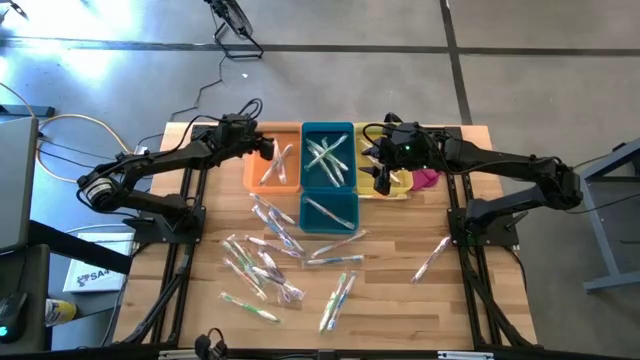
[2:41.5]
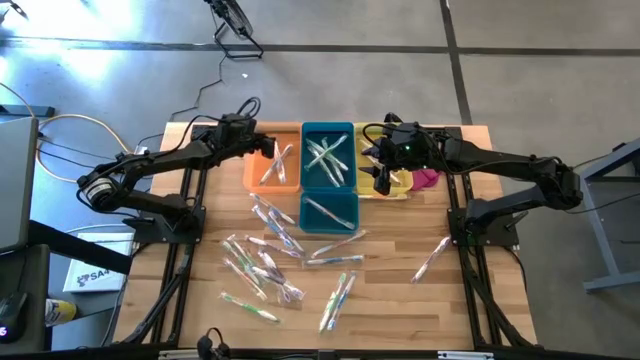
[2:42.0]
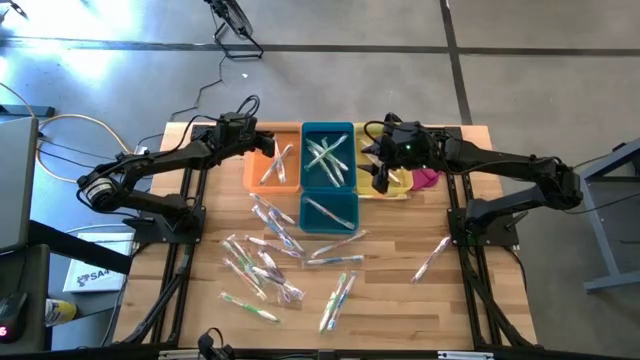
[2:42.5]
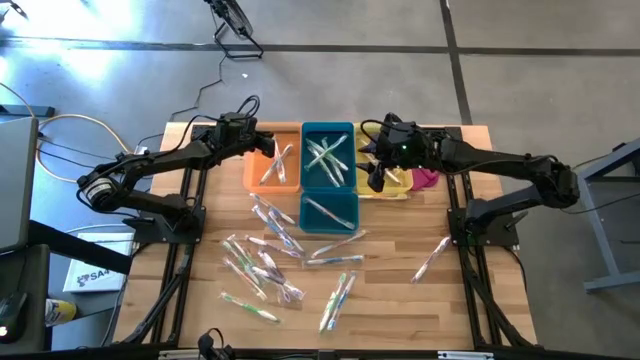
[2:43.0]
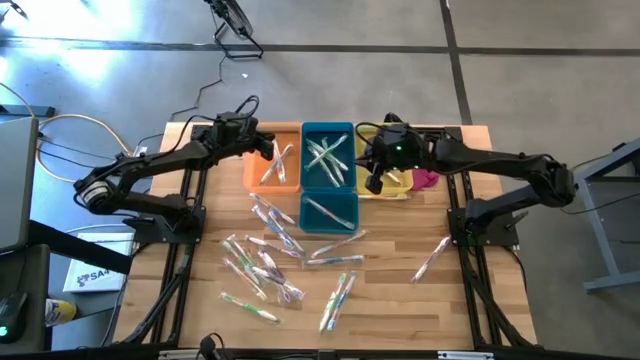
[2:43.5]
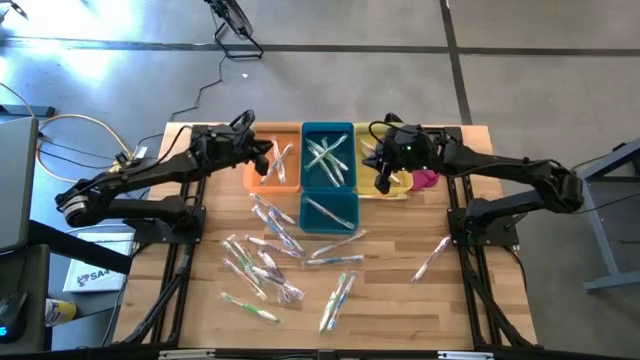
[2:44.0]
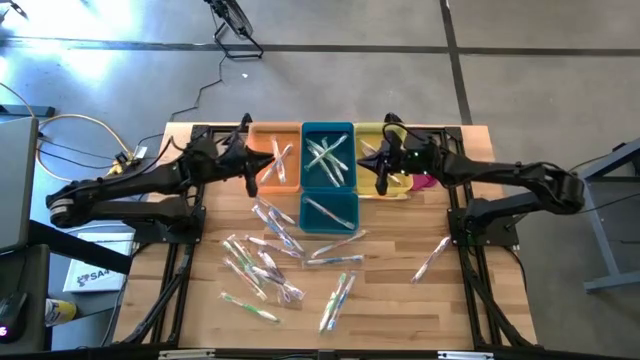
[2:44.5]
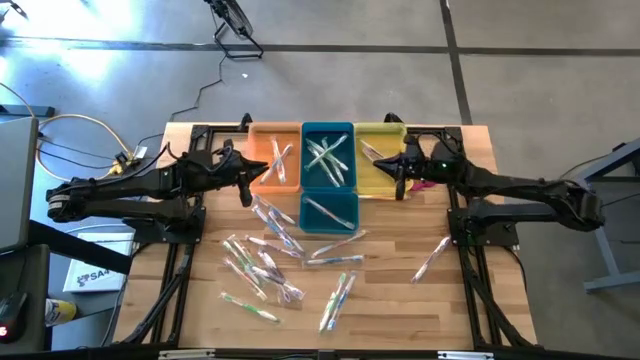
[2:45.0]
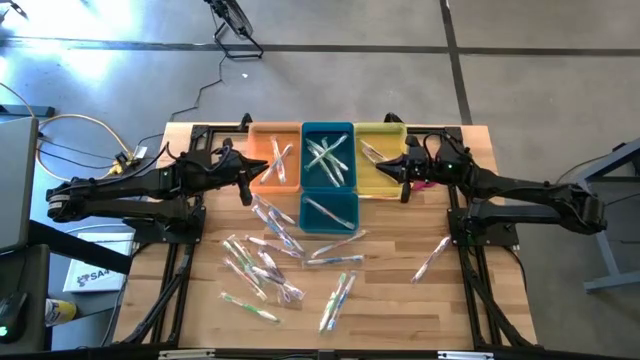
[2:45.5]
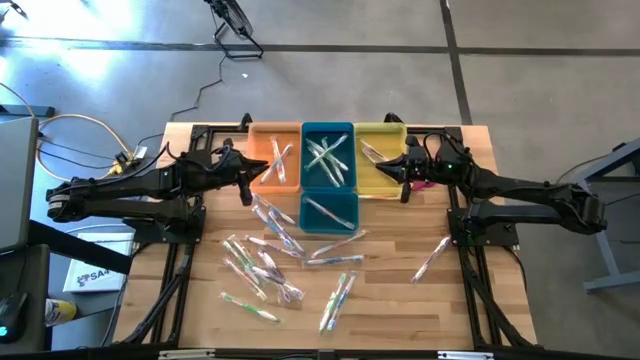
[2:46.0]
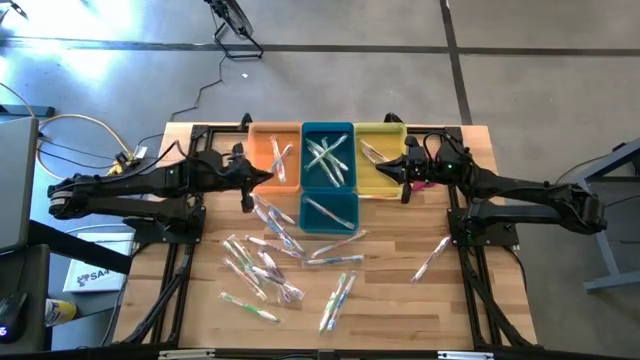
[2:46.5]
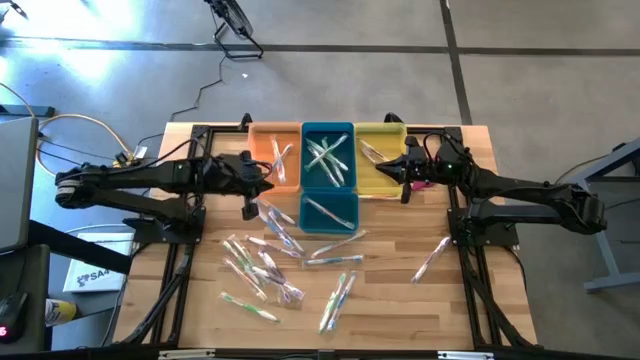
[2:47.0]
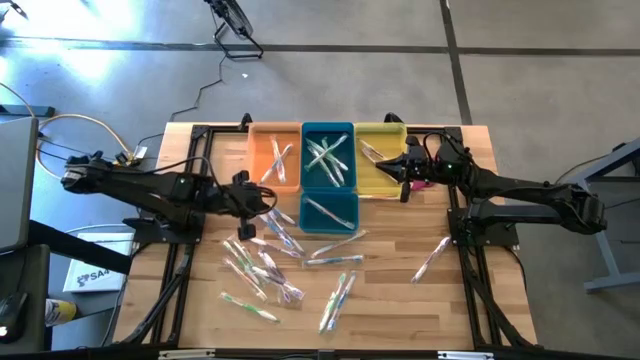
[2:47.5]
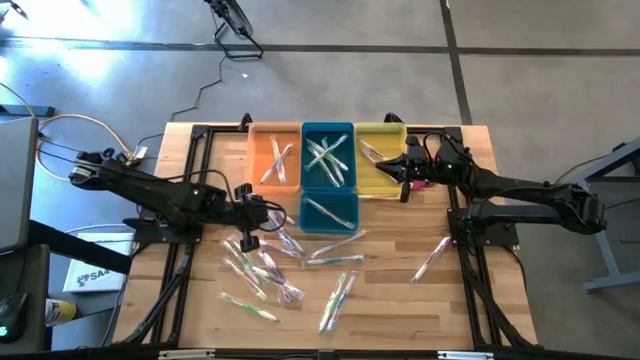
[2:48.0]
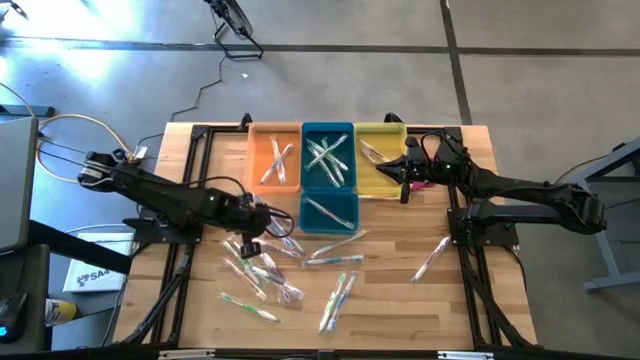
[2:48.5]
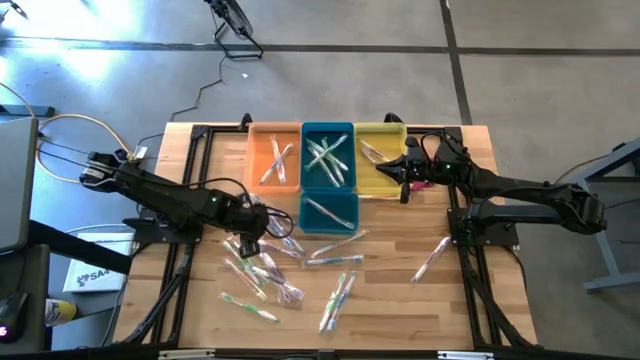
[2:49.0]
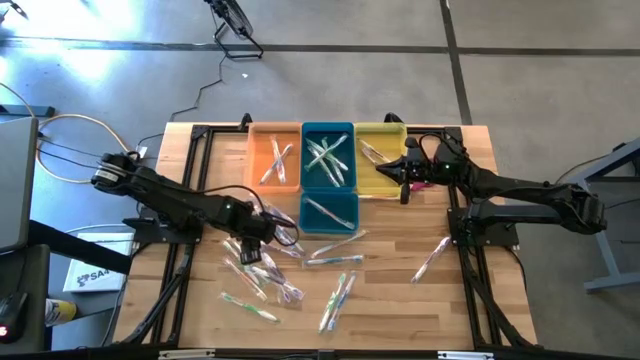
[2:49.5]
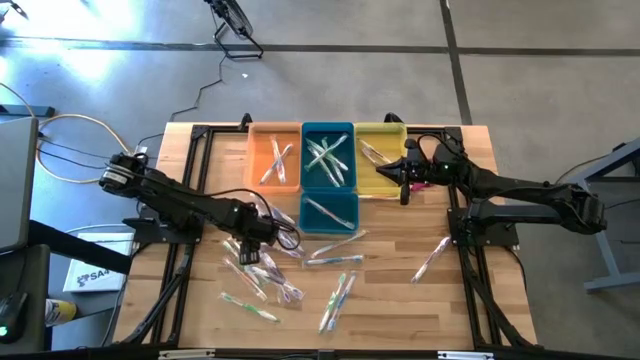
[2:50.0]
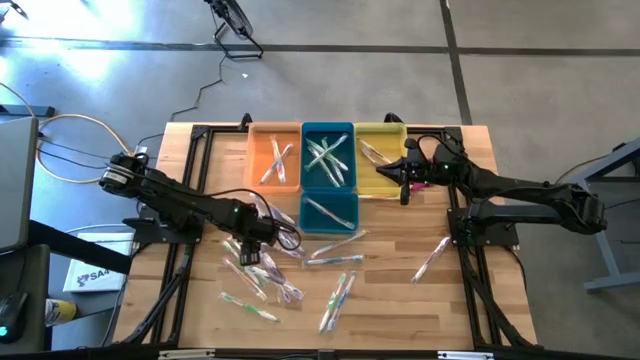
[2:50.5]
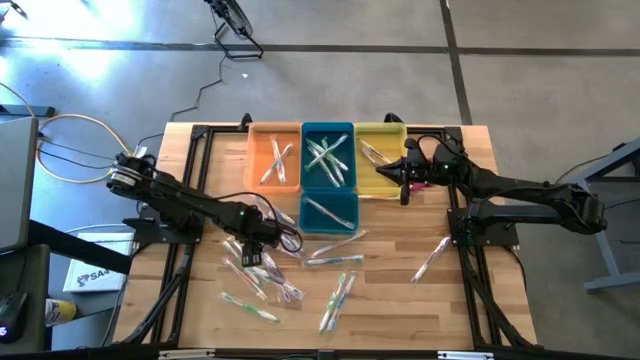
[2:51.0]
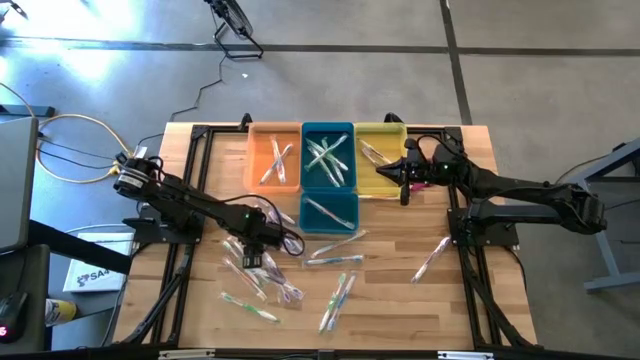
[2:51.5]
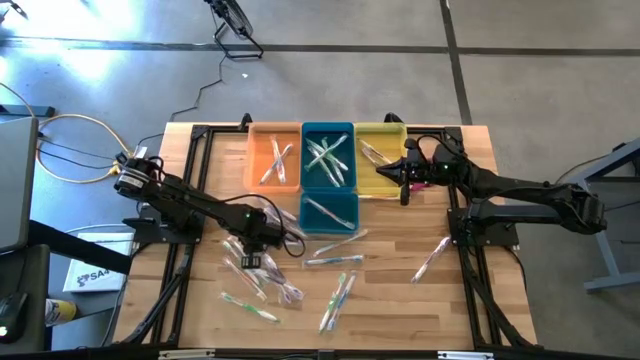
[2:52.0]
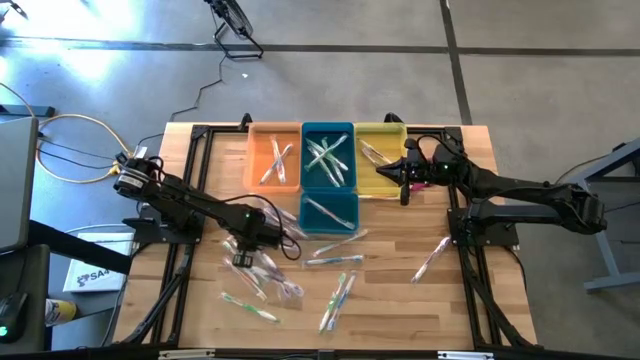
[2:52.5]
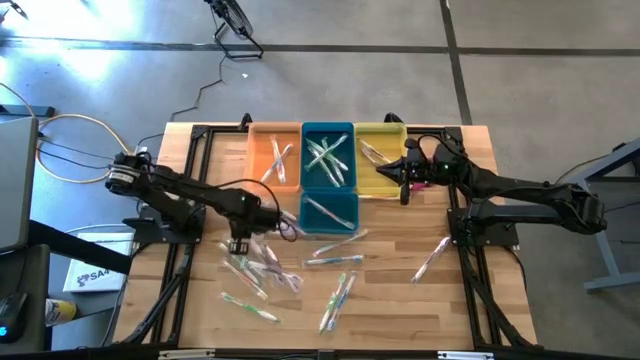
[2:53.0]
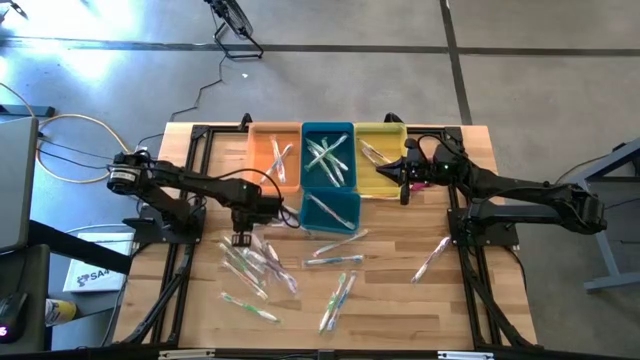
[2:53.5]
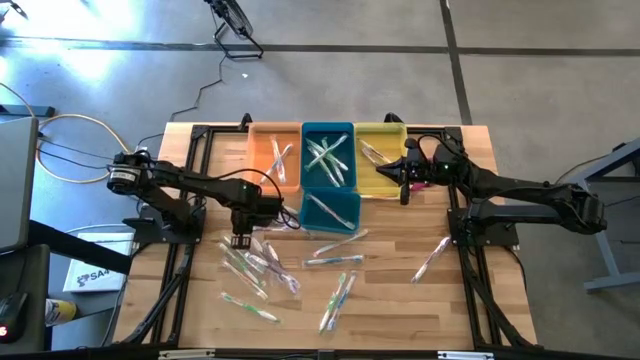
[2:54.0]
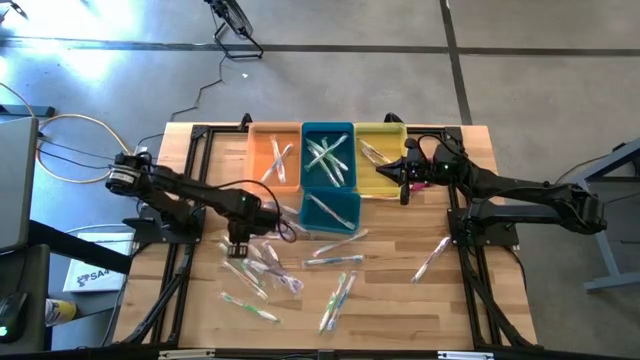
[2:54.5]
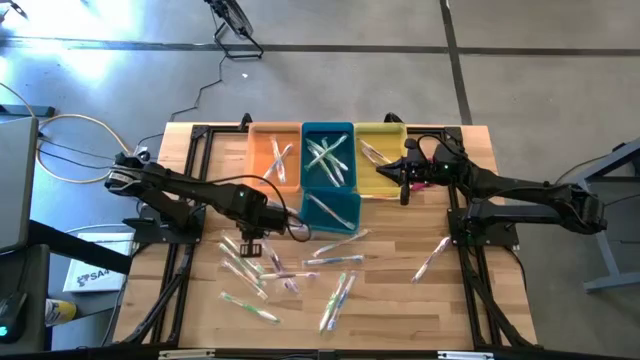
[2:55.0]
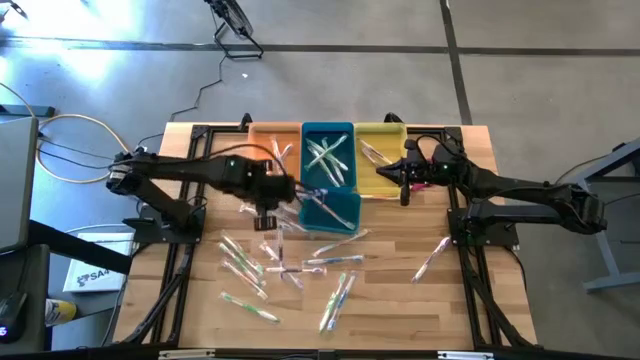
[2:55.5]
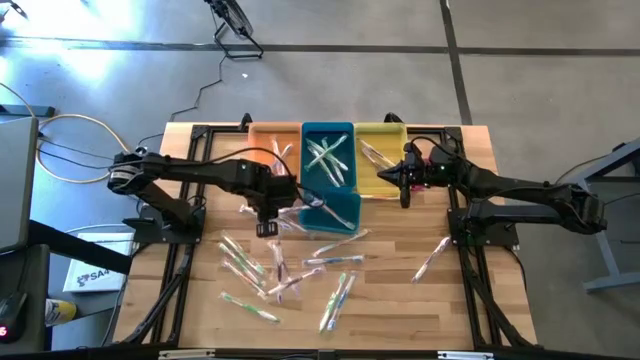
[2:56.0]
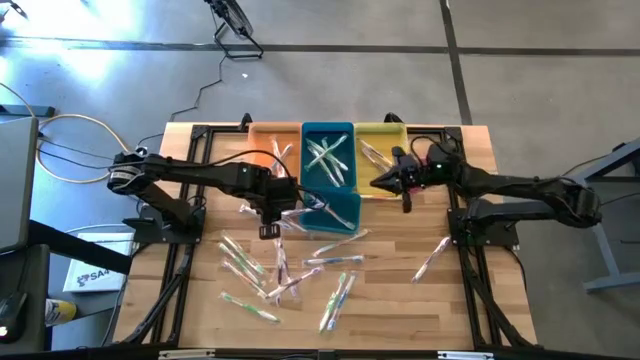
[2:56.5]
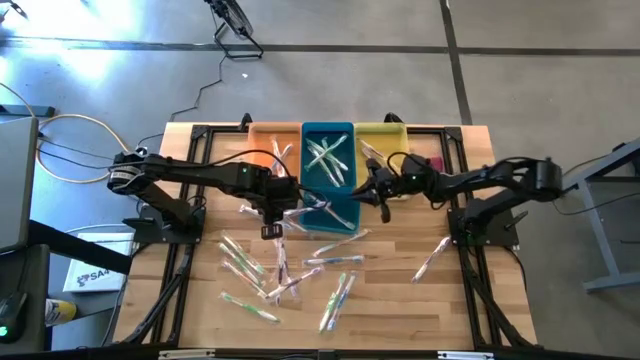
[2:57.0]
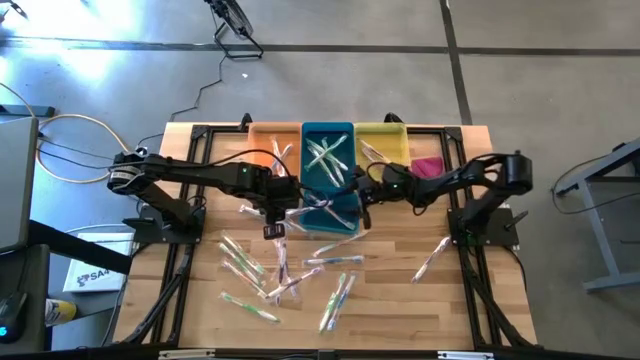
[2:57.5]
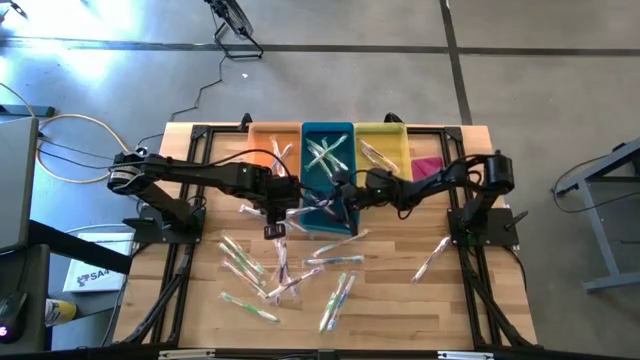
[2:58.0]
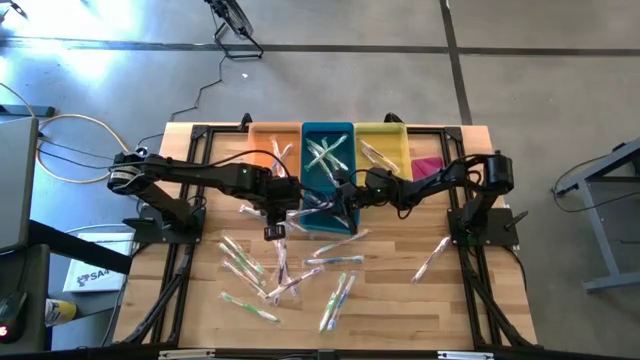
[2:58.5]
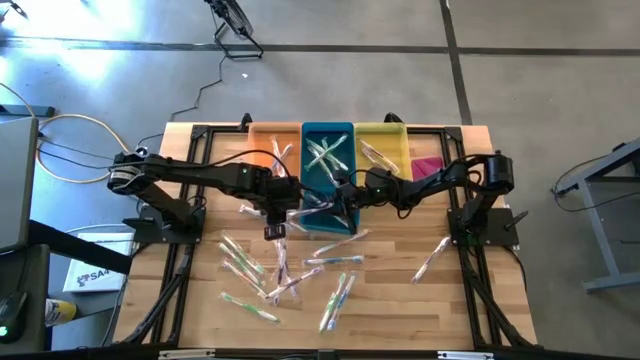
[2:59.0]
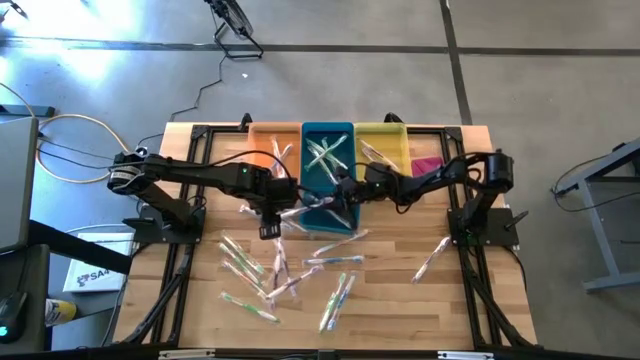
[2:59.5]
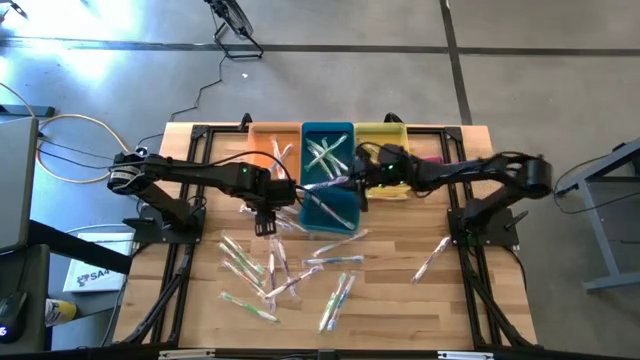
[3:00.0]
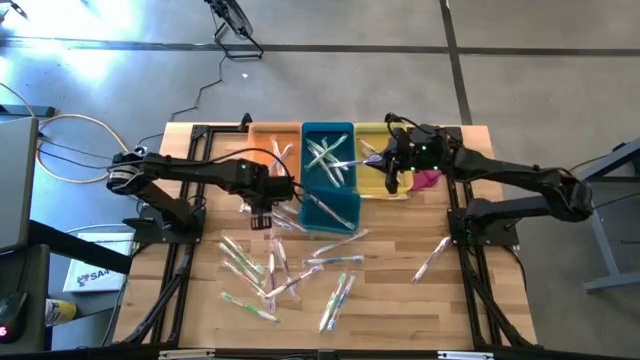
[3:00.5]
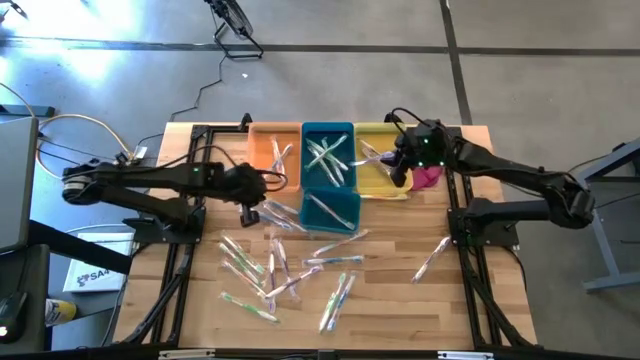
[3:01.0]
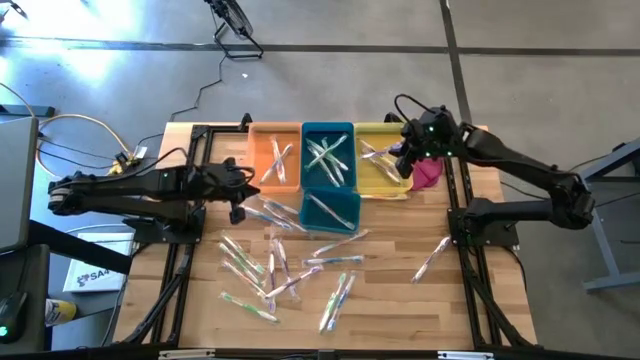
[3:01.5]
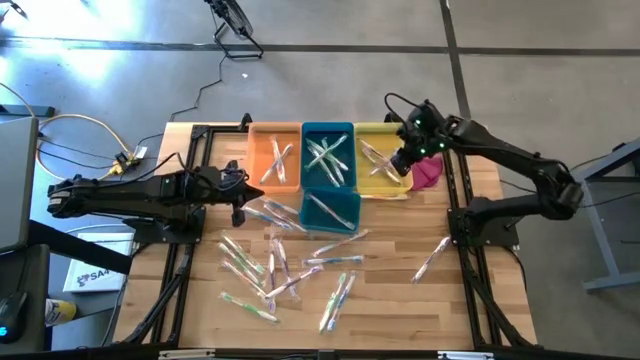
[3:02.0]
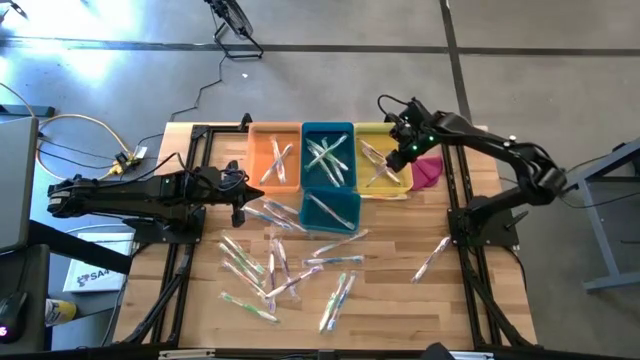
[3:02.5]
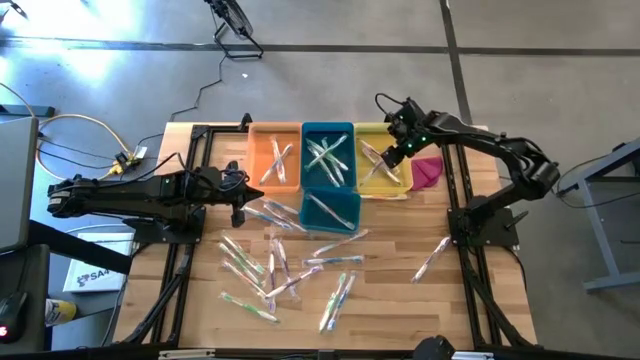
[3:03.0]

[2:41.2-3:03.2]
Task: Pick & Place Toothbrushes
Put the violet toothbrush into the yellow bin
